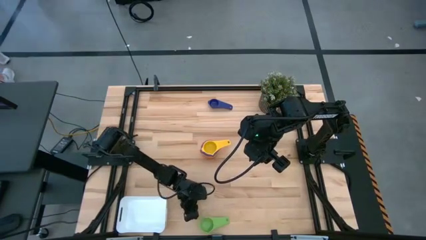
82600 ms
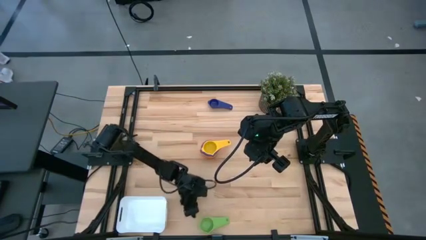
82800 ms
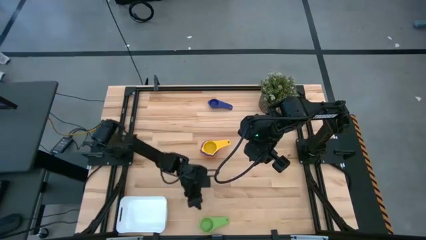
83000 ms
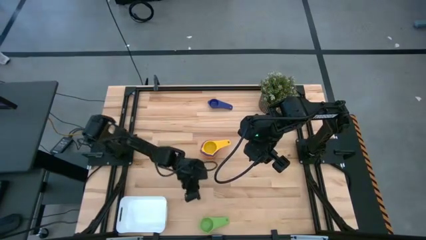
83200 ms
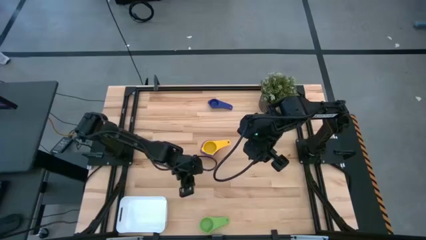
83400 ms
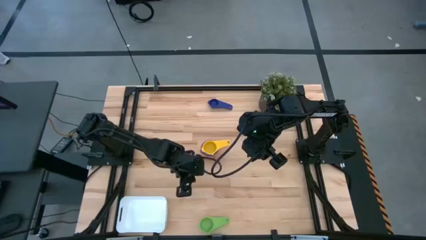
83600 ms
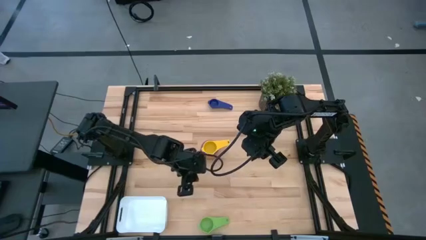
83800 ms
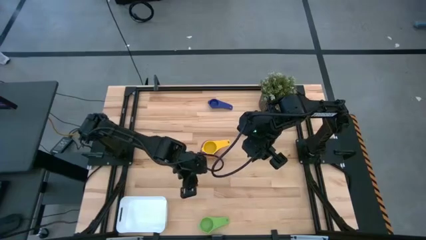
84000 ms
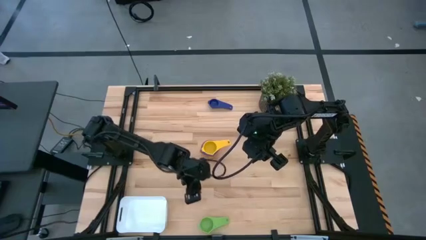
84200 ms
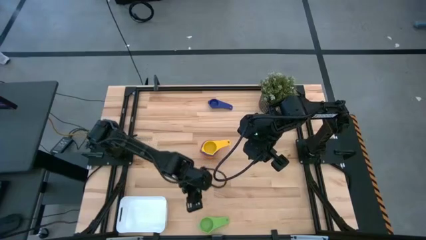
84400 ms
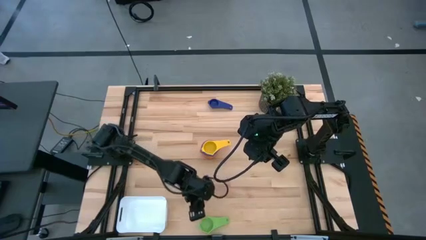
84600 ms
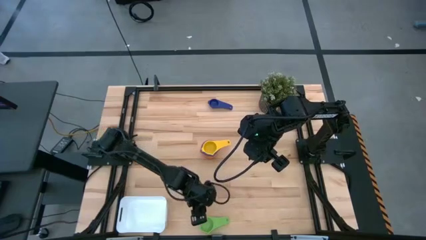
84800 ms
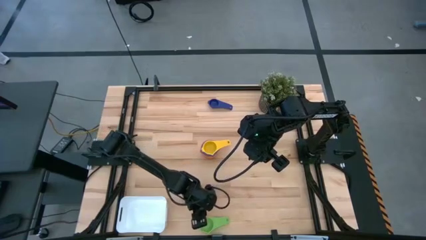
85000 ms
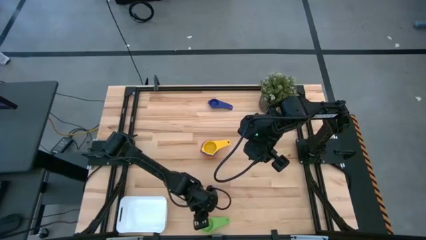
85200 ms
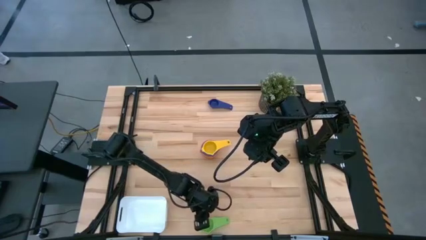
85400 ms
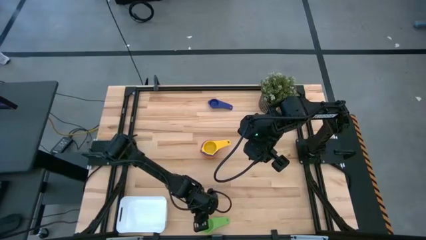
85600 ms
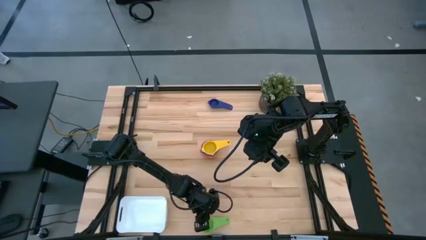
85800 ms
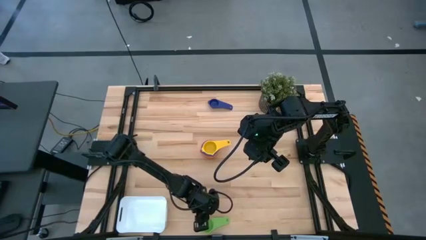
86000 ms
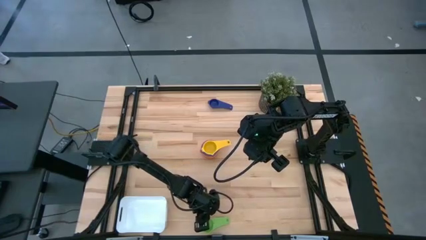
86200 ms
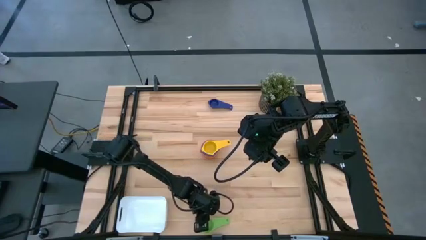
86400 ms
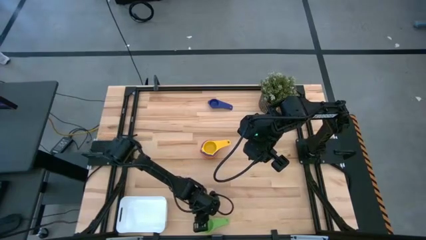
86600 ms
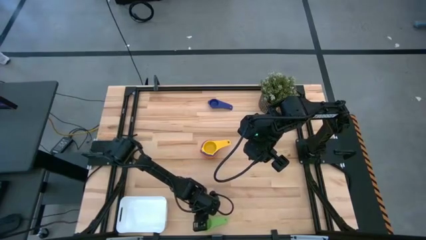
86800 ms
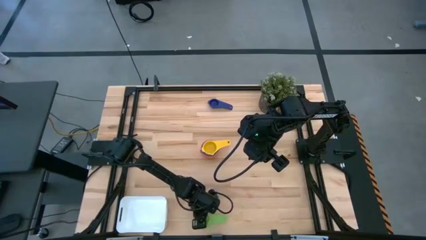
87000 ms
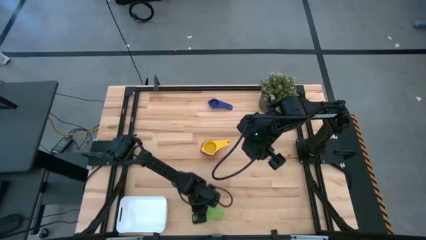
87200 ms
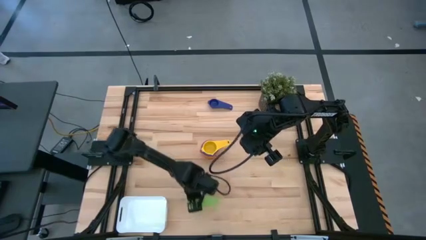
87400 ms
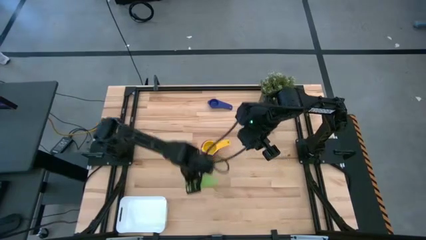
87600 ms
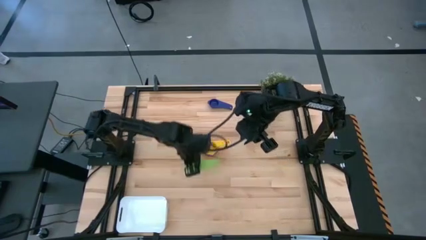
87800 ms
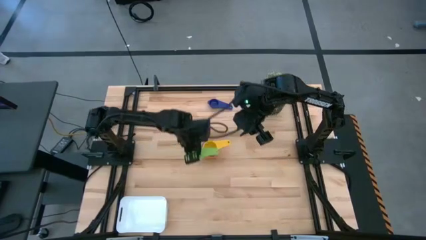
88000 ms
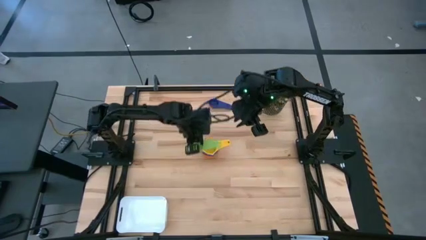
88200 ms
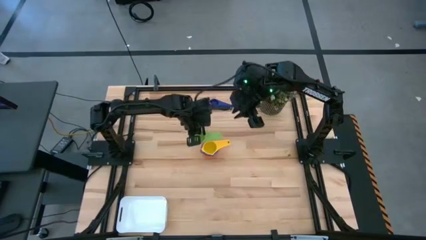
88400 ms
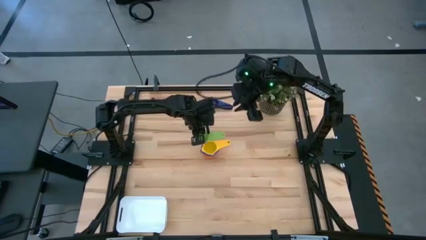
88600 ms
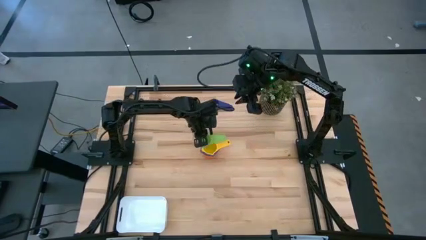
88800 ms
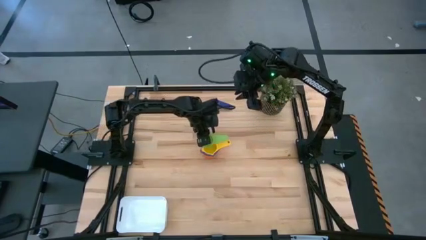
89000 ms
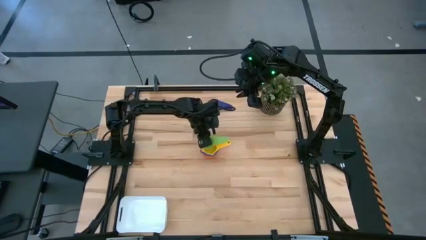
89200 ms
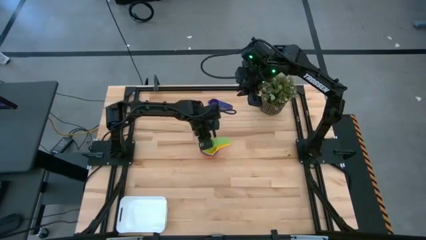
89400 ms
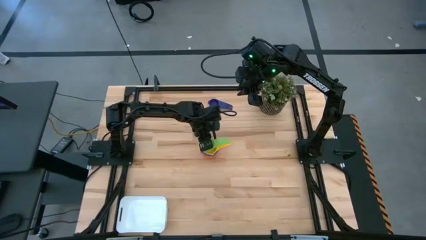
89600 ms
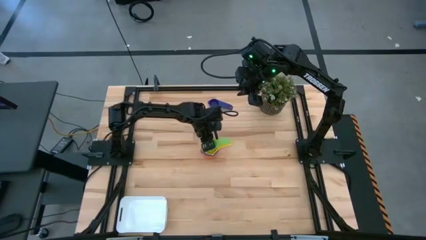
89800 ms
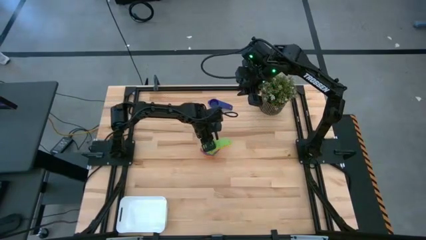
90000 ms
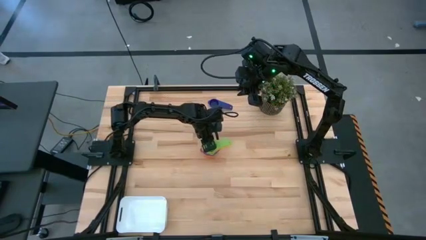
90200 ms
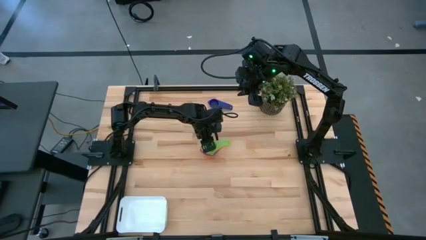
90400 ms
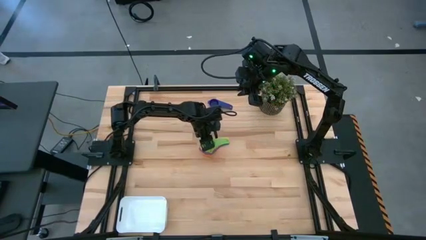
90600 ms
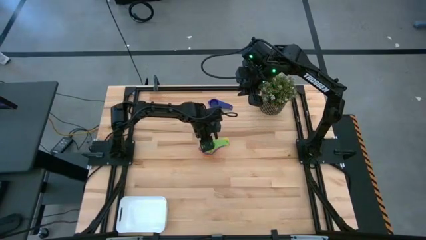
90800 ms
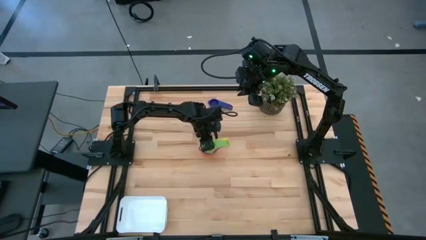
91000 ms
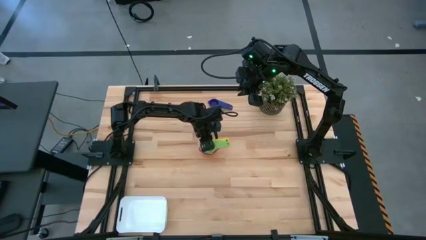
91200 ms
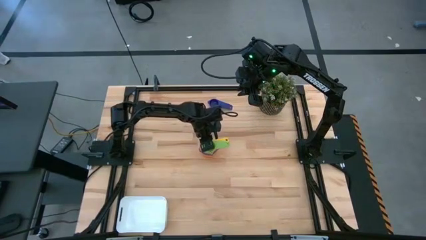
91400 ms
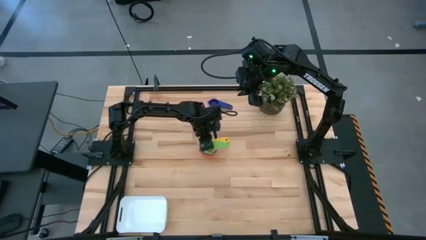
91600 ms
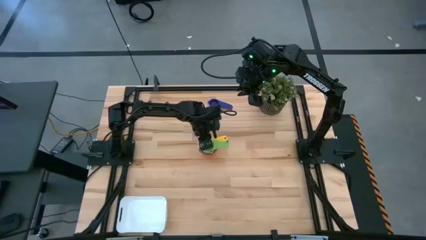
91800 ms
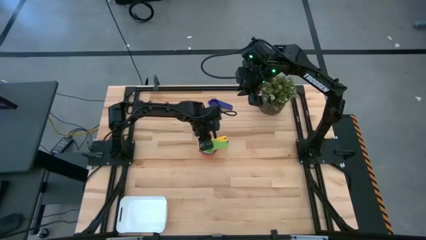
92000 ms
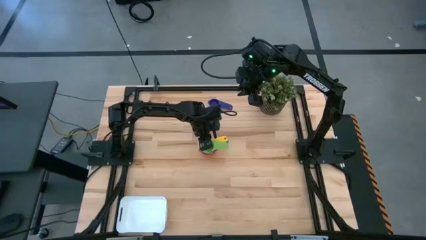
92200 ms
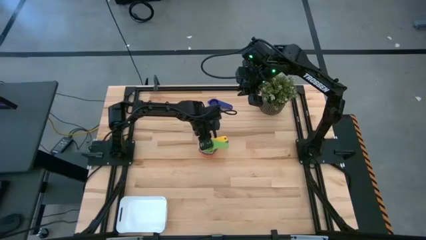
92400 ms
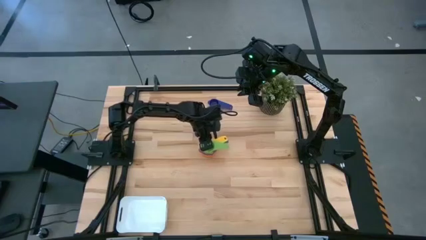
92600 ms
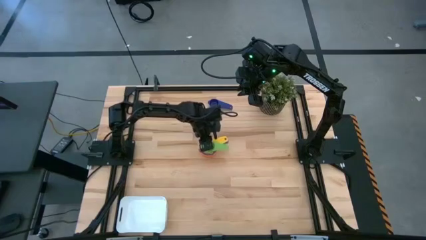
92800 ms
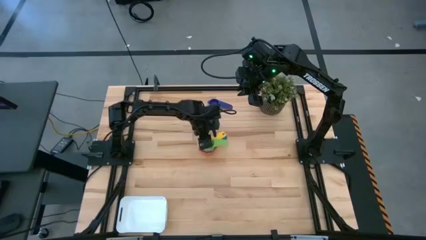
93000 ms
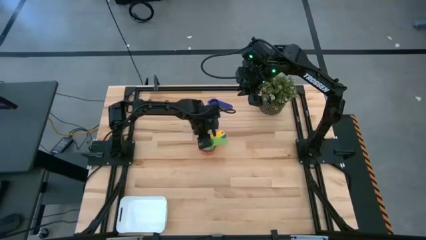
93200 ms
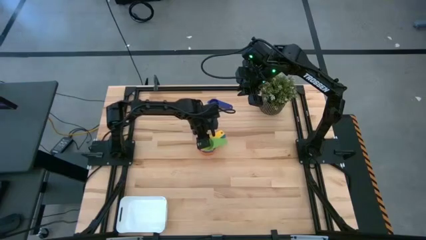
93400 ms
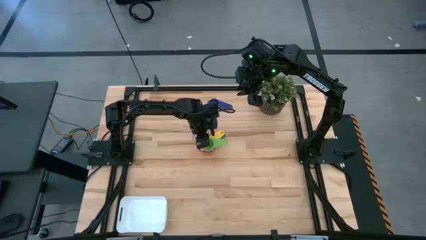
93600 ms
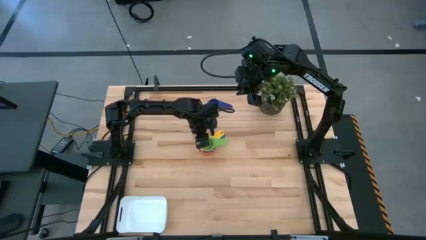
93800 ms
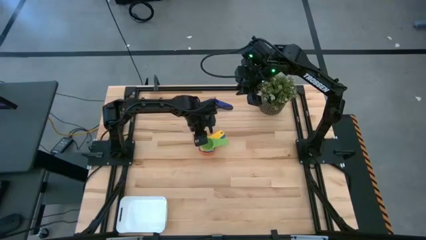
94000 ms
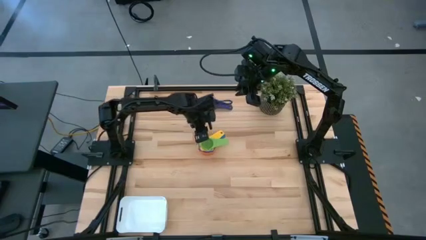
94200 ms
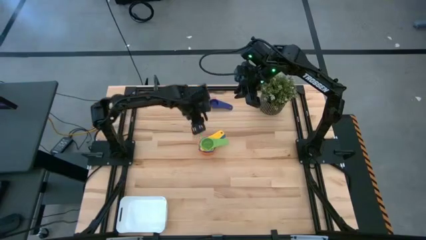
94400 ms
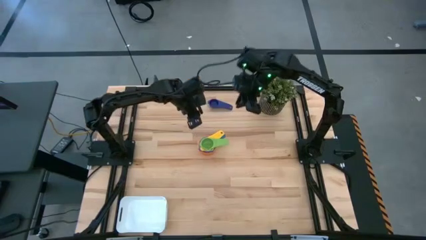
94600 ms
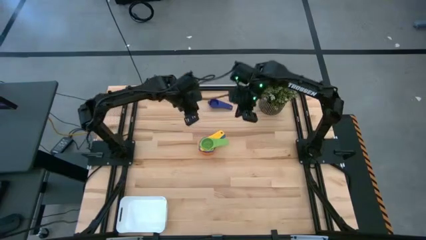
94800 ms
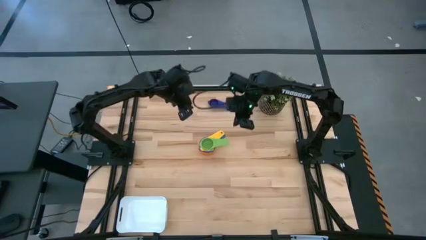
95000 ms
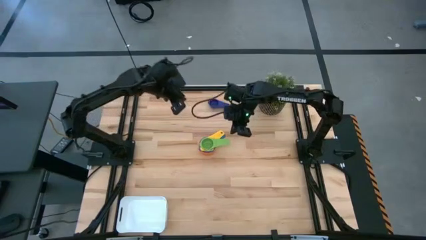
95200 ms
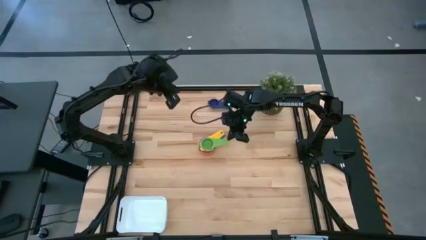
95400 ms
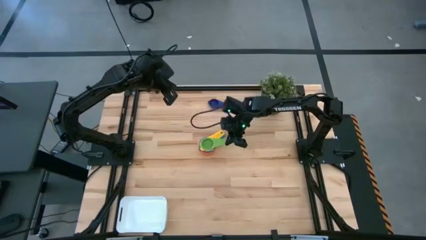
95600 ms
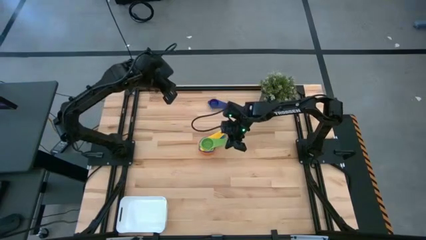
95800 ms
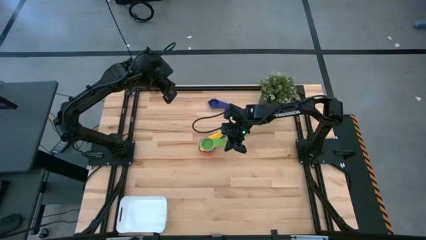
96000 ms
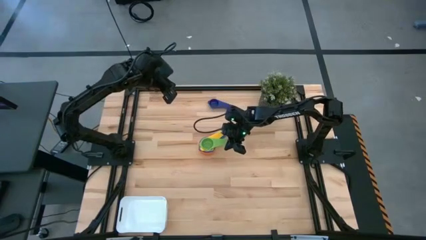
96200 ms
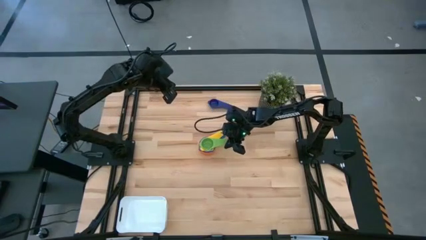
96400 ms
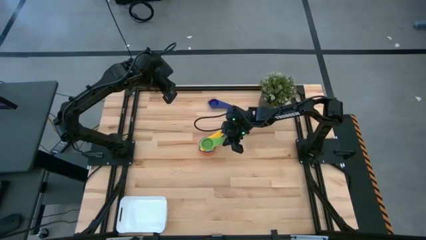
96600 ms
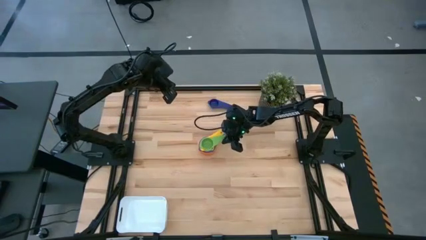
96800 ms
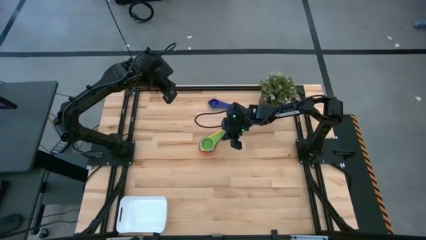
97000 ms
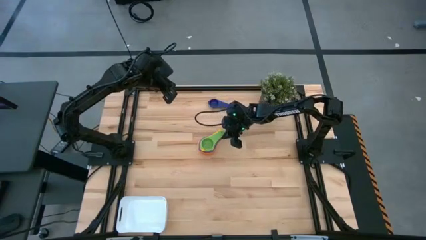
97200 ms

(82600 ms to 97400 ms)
Task: Nest measuring cups in basket
Stack the green measuring cup into the yellow measuring cup

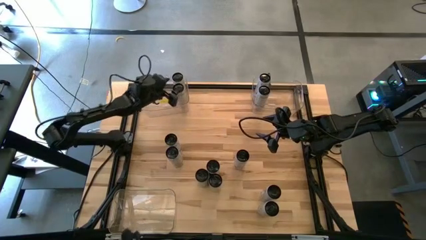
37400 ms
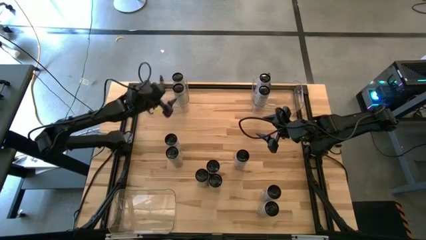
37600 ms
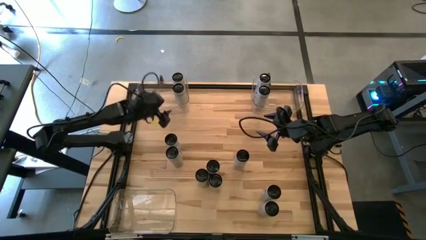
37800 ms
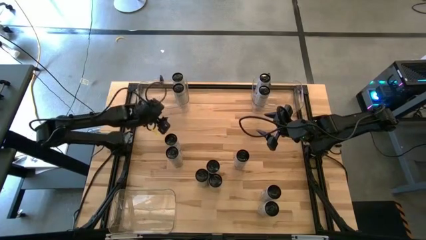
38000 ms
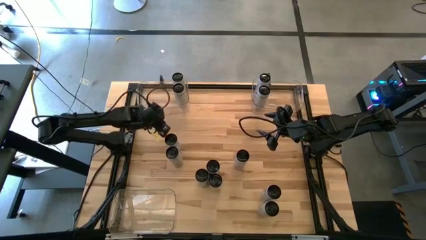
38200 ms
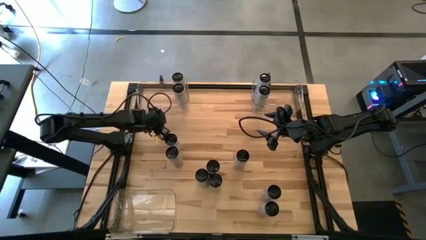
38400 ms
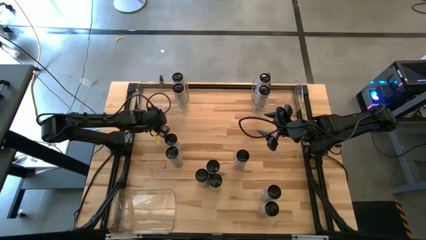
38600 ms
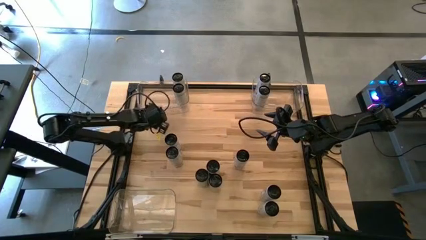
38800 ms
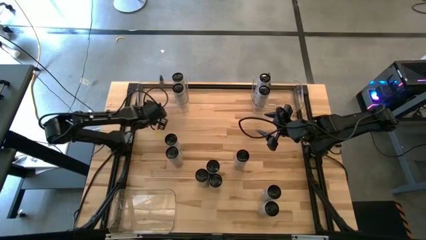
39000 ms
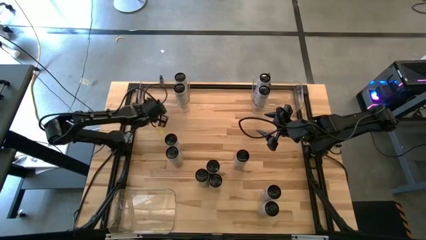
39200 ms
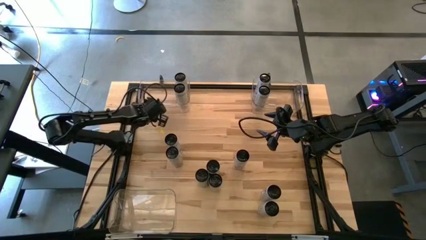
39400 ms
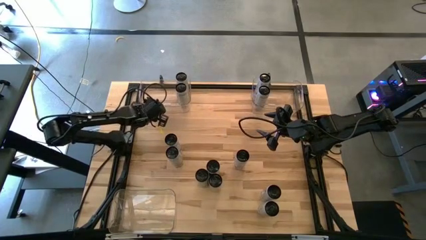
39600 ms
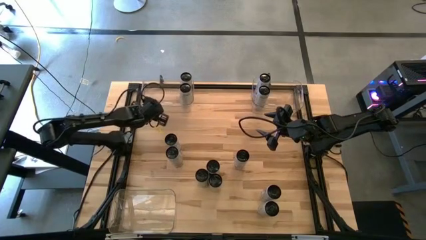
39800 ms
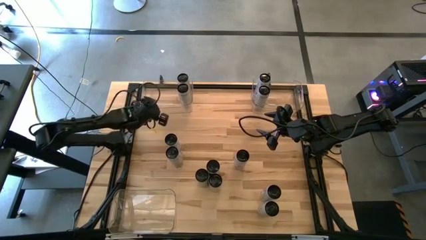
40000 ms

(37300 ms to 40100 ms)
Task: Sort soda cans
Adjust the top left transparent bin

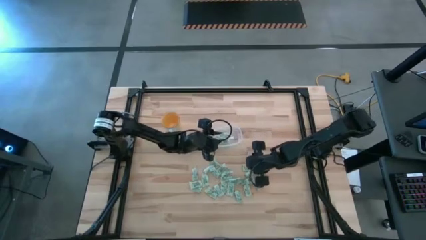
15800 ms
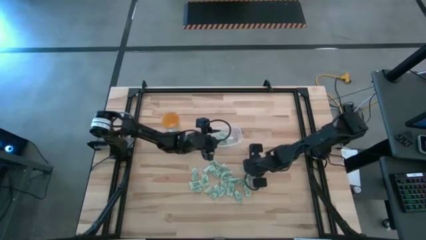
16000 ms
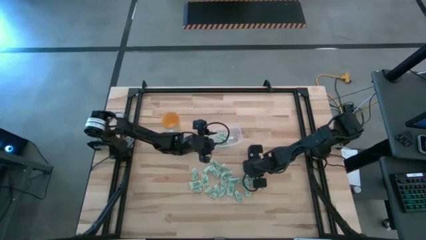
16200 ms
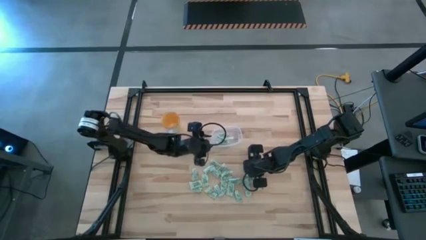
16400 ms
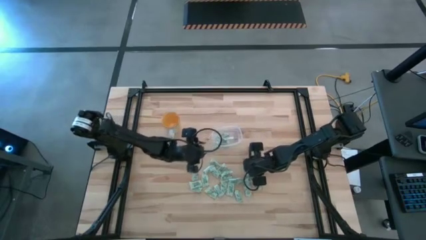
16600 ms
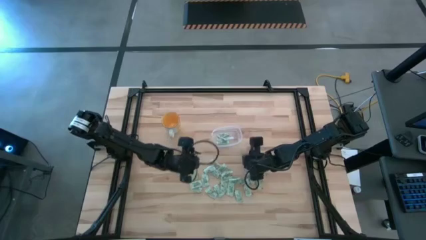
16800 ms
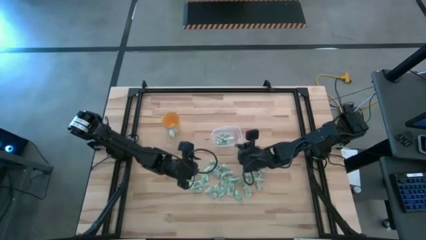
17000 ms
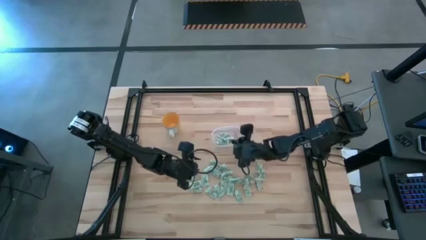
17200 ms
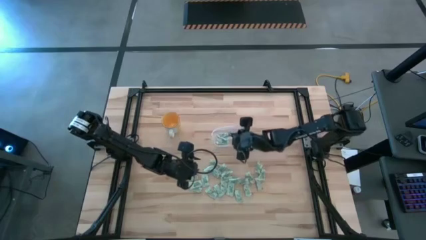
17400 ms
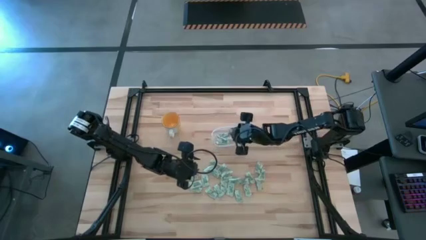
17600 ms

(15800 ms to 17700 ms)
Task: Pick and place Stevia / Truvia into bins
Put the stevia packet into the transparent bin
